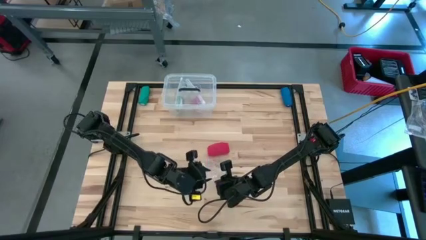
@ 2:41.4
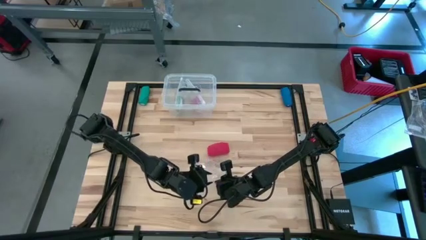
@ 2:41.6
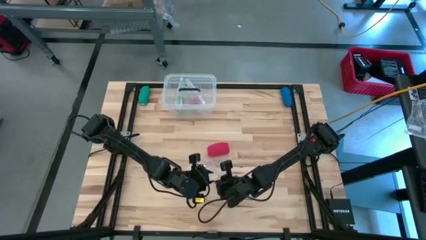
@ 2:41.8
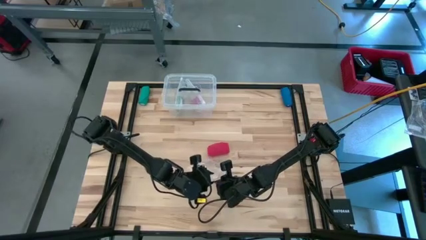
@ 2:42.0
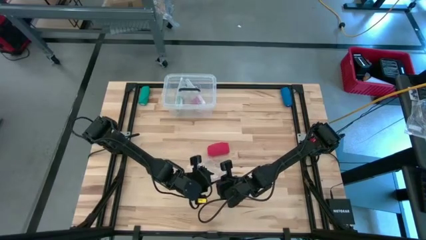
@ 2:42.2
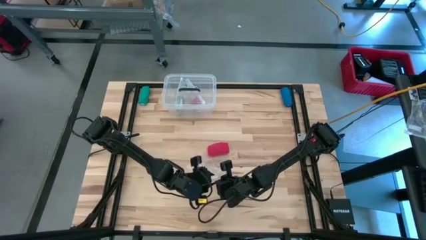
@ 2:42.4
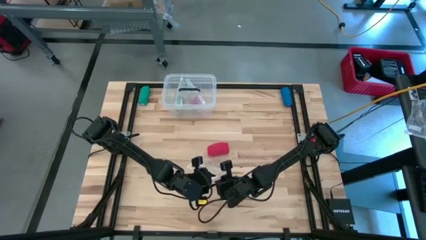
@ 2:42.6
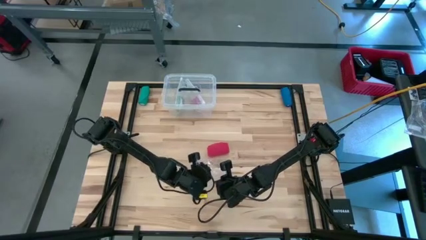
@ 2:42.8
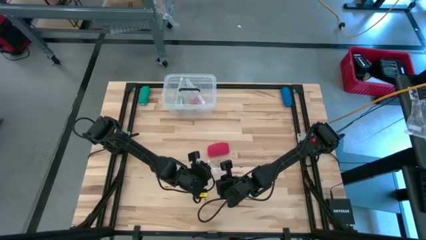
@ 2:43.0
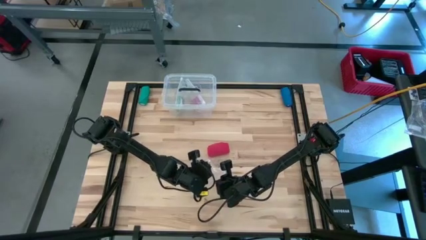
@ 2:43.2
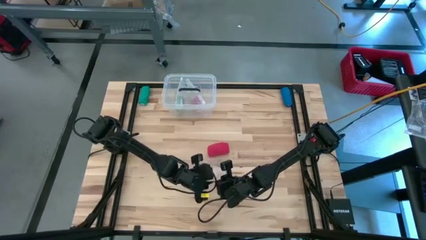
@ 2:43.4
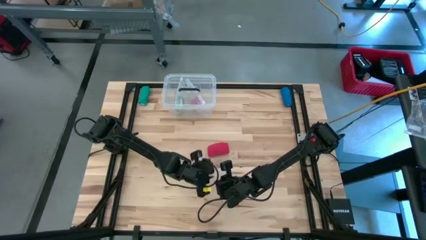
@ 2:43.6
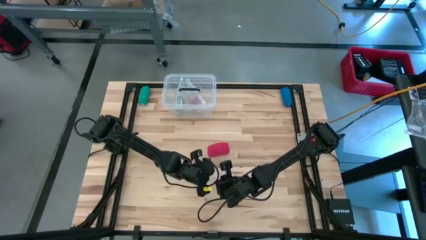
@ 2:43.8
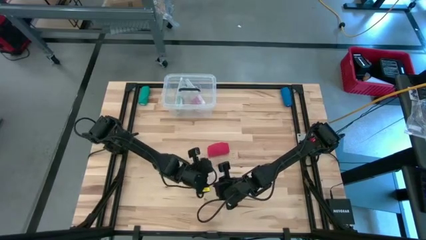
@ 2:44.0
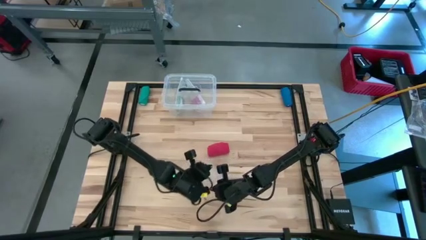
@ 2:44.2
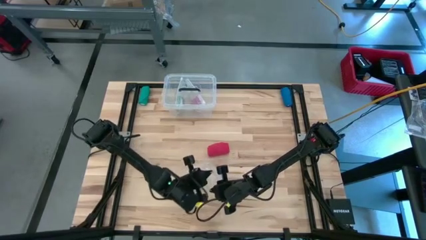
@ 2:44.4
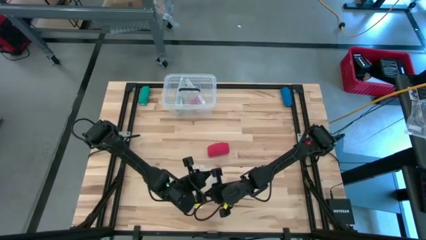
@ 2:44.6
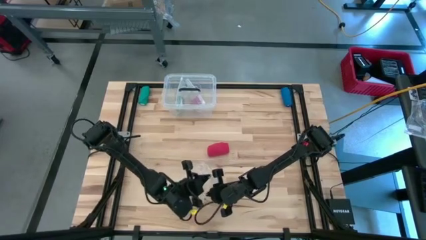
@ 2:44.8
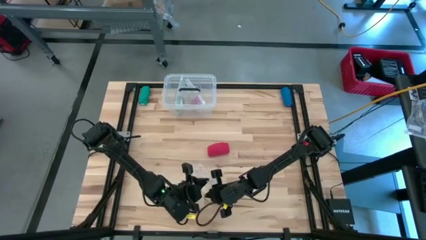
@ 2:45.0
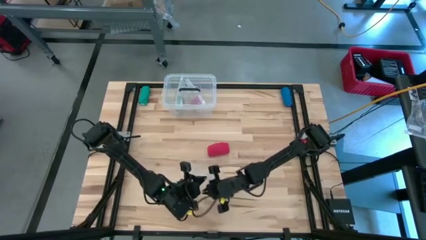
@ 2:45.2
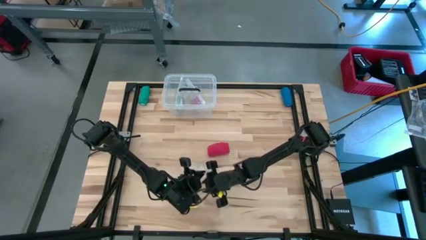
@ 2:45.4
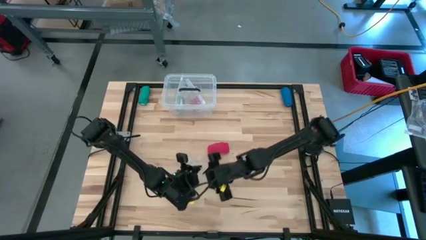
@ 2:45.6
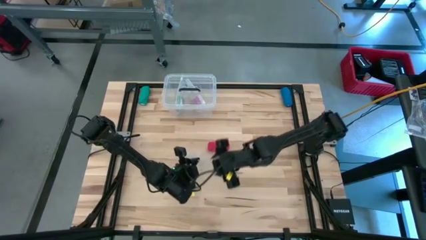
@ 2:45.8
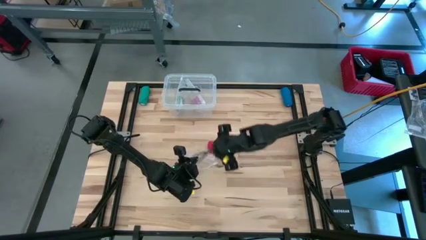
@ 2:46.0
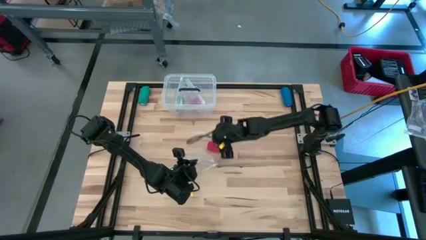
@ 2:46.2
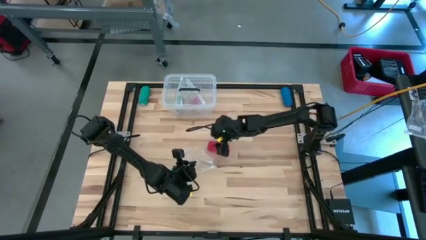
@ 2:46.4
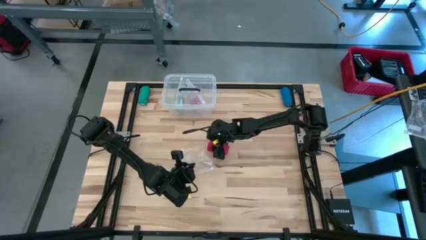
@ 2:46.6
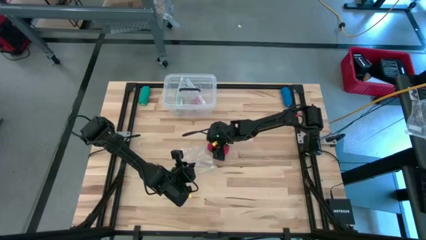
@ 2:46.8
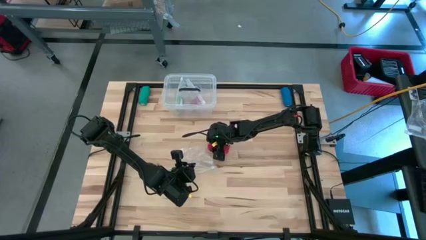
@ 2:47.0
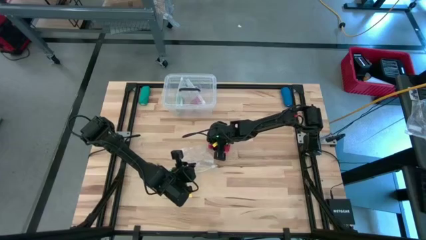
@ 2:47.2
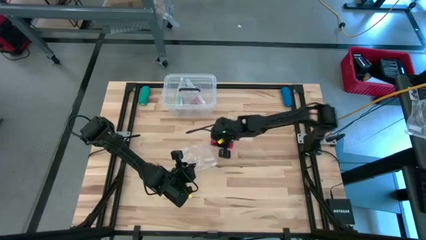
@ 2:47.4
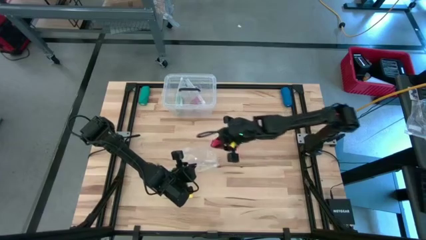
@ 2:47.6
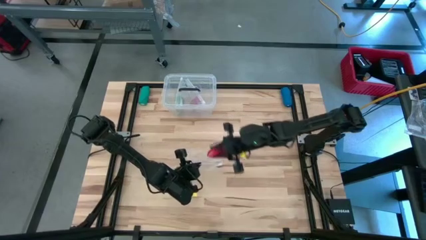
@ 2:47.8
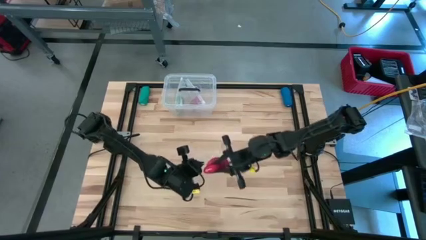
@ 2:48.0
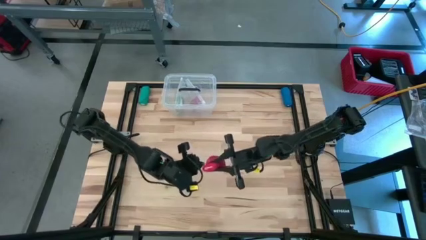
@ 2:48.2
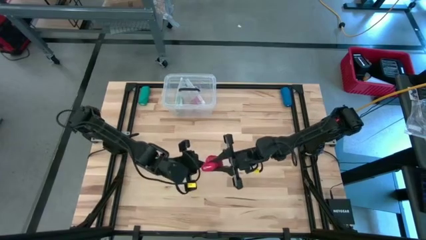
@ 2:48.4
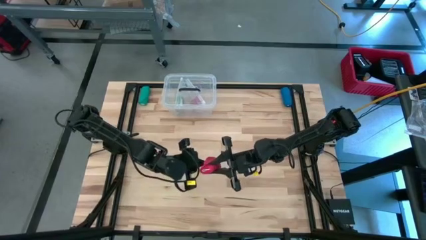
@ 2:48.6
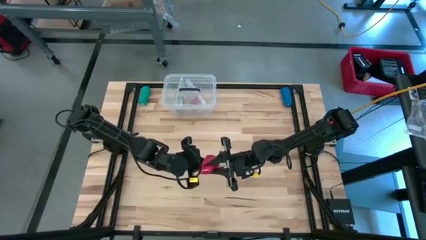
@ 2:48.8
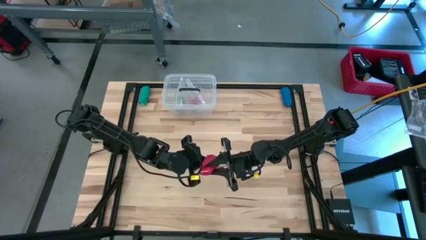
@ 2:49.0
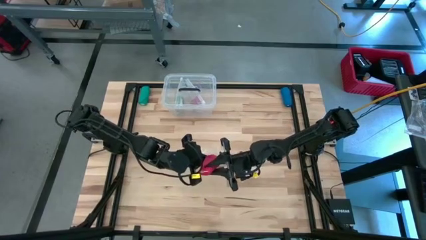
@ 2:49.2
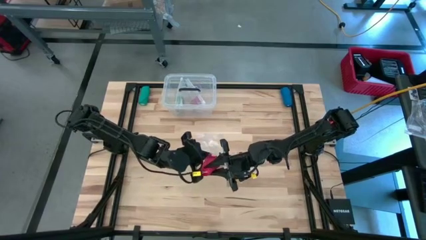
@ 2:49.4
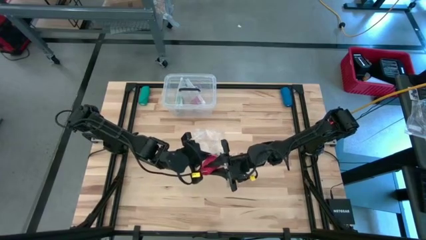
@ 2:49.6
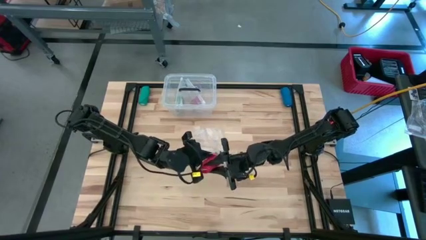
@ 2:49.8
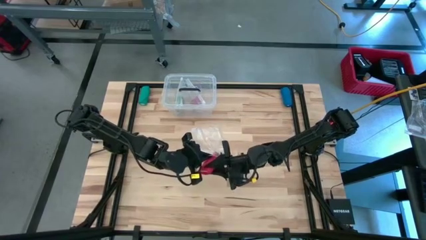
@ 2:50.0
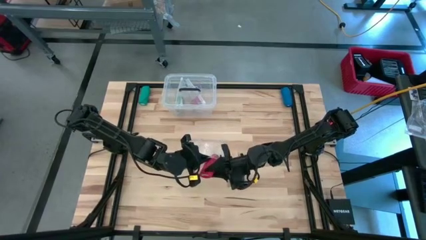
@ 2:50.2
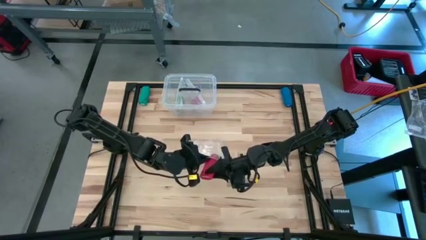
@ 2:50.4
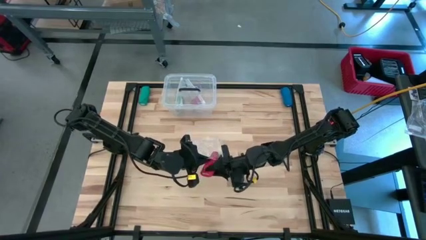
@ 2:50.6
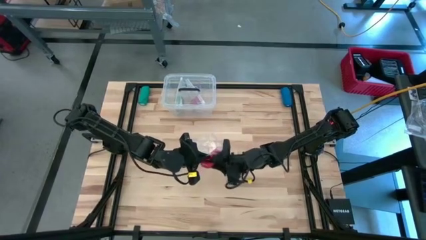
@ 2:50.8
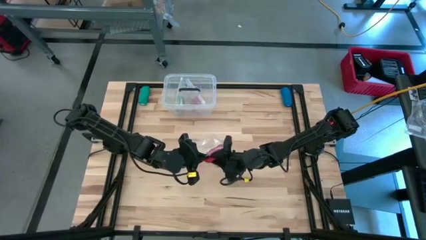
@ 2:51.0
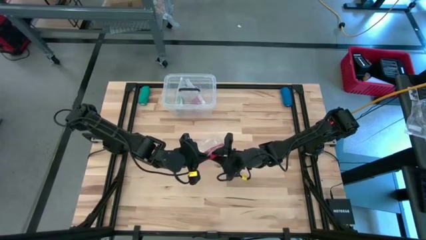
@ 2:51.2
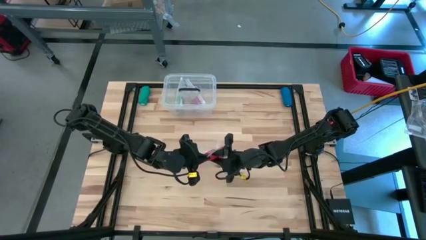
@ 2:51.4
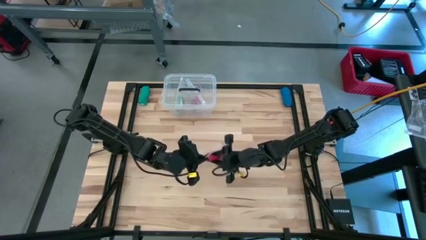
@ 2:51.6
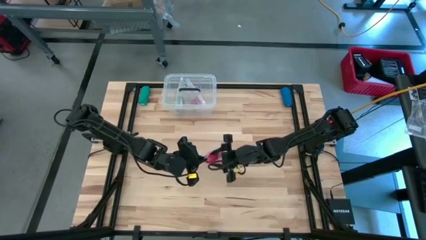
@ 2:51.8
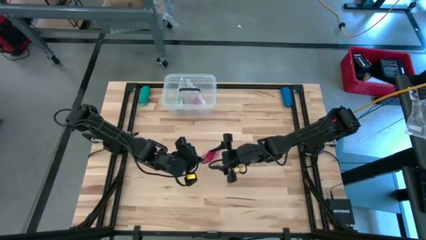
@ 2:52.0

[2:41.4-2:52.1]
Task: Roll bandage
Put the red bandage into the zip bag

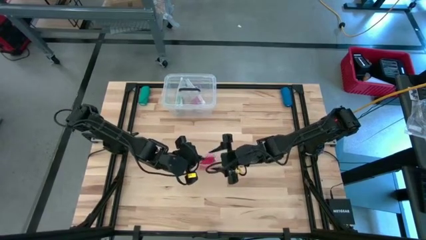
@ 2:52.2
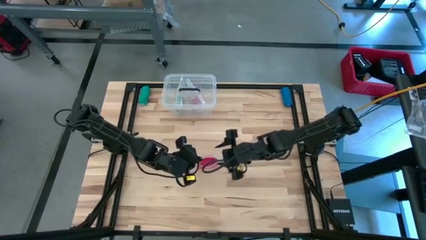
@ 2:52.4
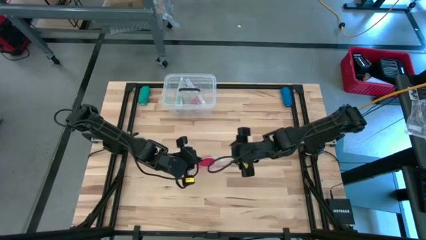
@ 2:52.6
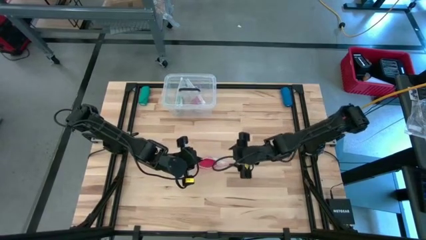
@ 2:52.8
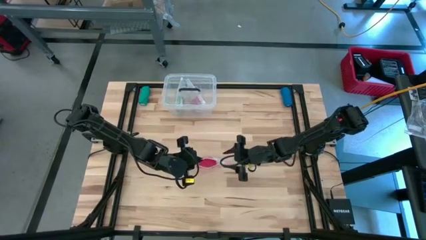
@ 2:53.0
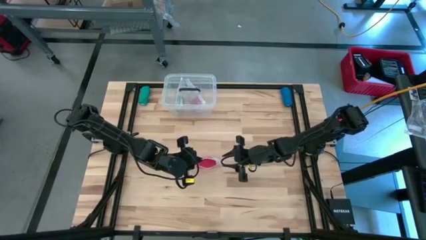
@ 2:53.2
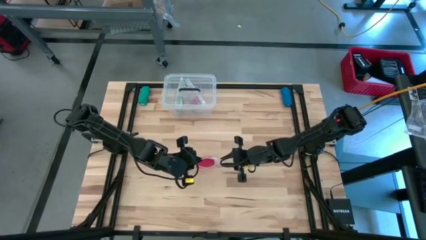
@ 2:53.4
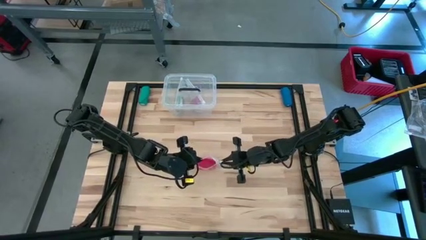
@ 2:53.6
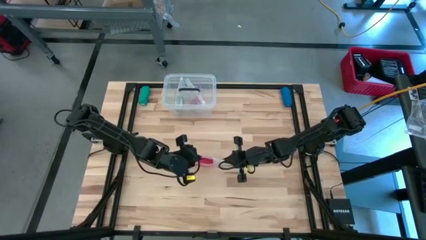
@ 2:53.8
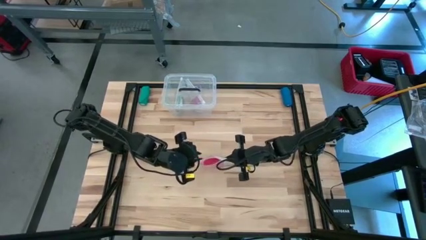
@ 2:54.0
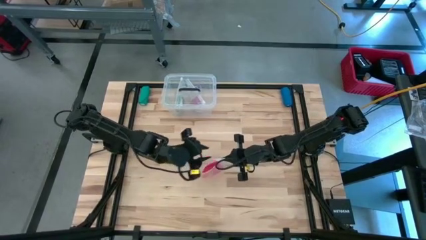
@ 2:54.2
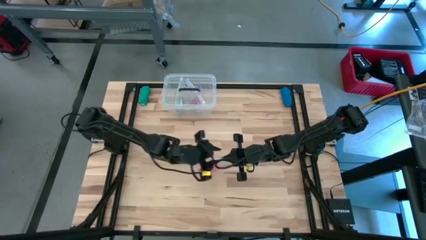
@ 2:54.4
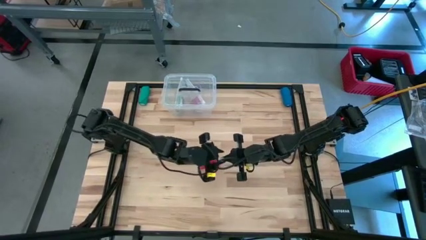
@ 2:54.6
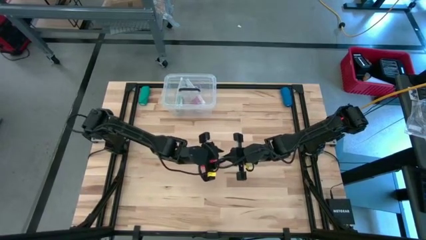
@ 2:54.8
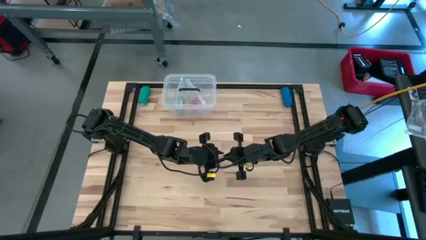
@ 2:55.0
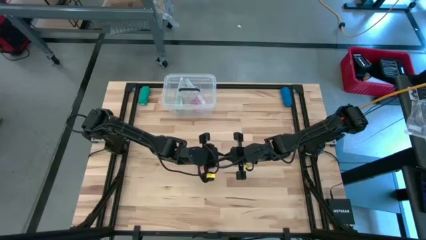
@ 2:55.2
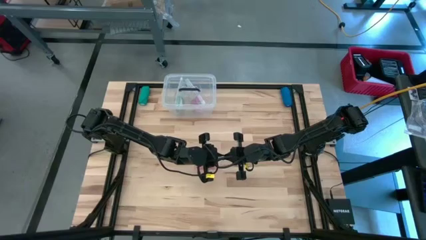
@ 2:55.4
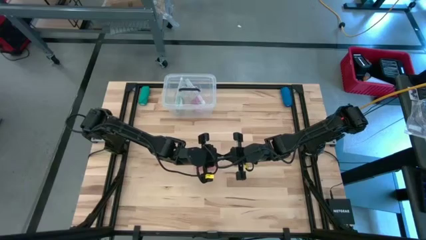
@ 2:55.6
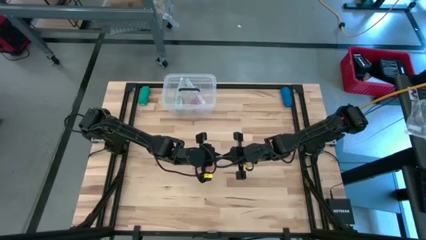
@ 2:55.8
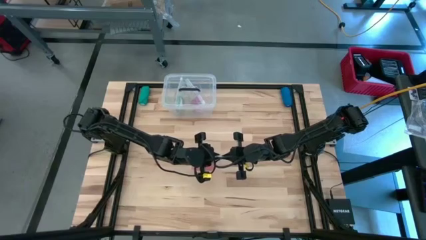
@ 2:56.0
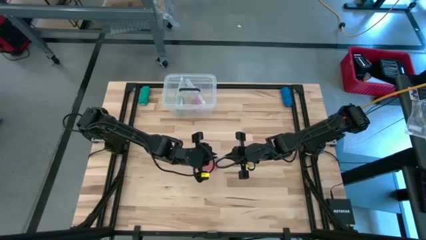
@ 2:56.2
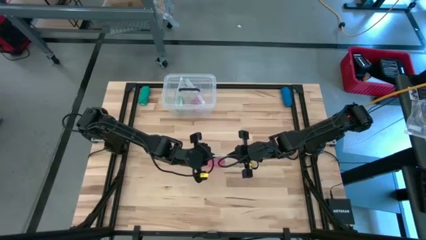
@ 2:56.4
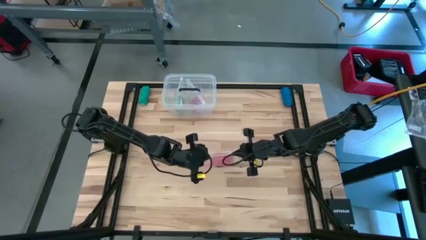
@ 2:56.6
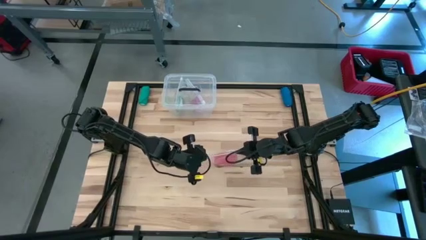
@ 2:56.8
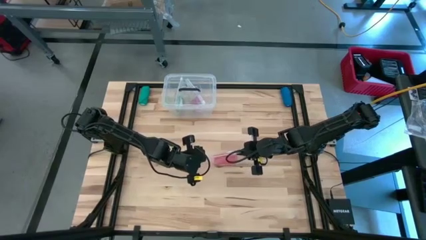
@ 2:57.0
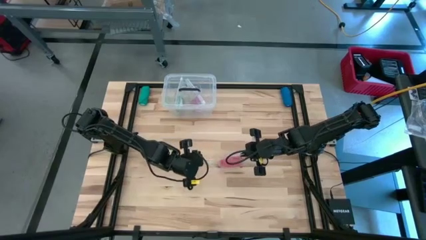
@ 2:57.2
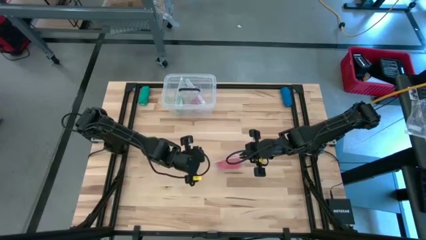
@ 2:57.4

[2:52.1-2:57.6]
Close the zip bag
